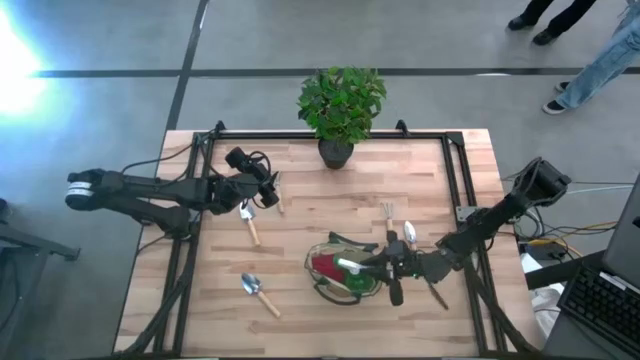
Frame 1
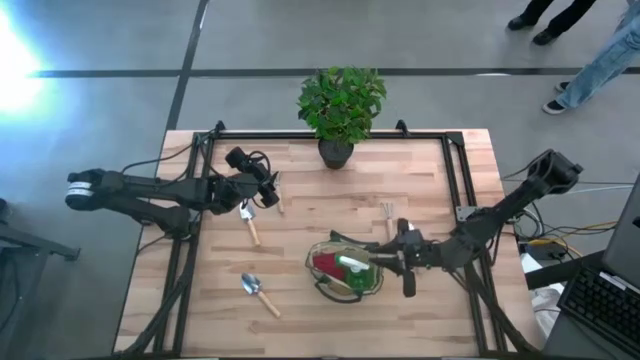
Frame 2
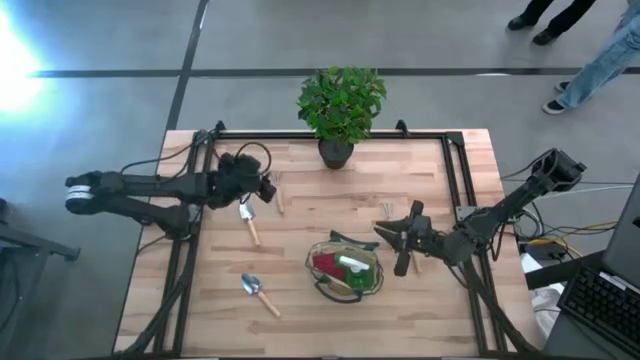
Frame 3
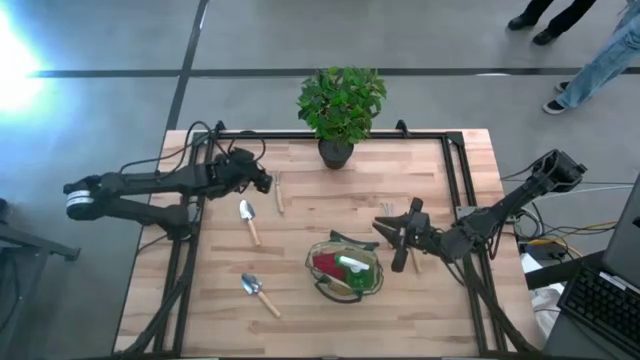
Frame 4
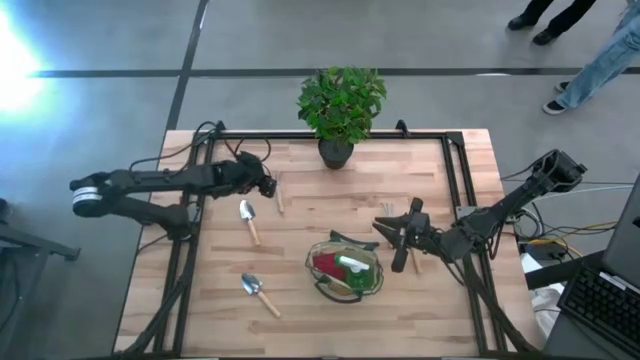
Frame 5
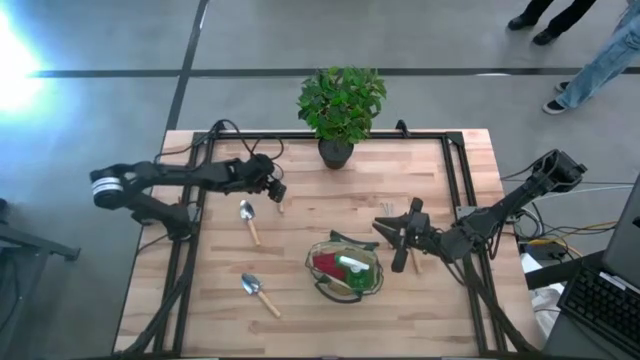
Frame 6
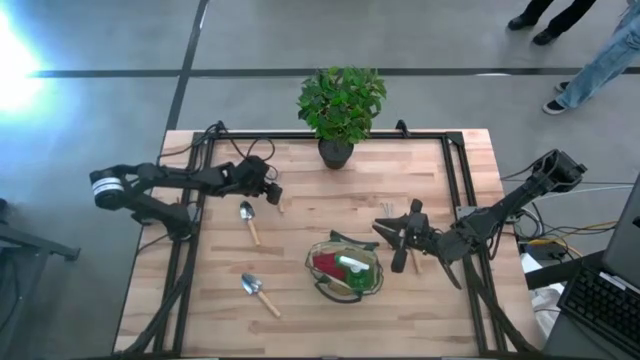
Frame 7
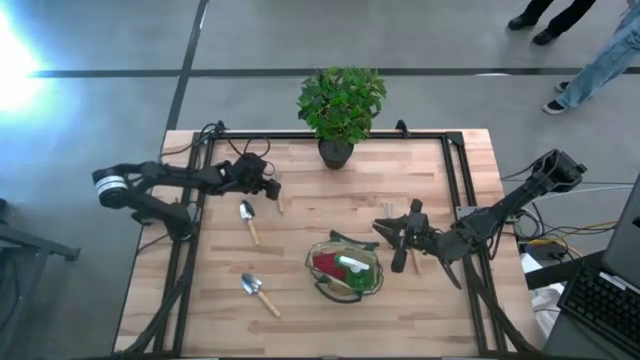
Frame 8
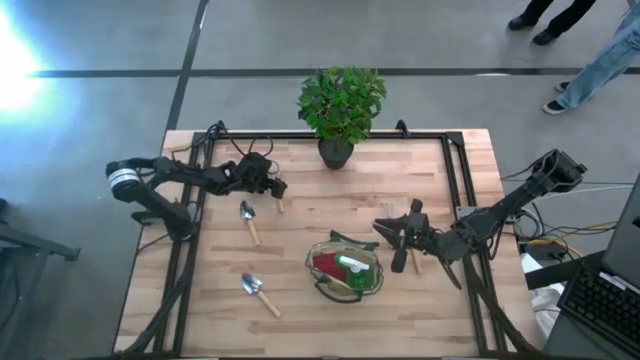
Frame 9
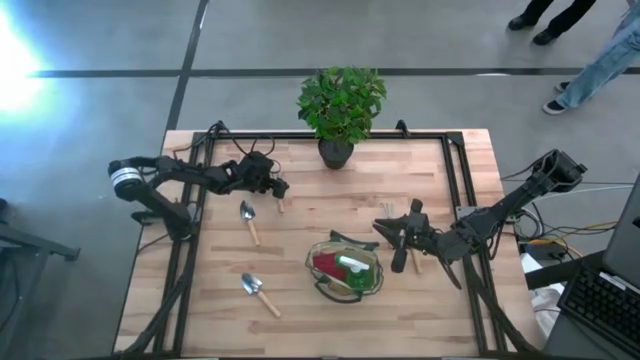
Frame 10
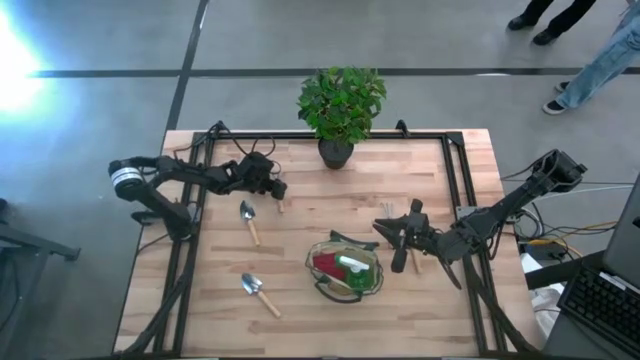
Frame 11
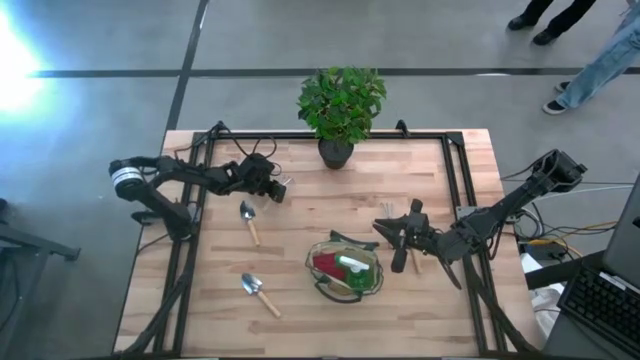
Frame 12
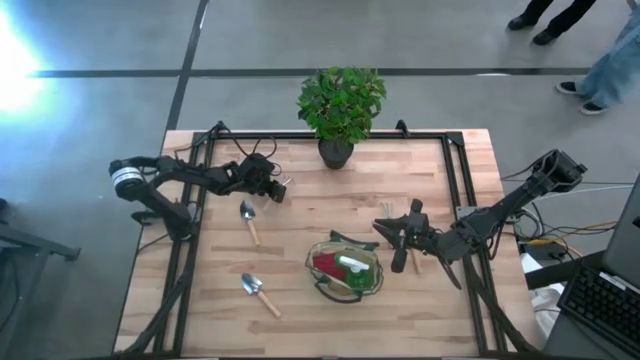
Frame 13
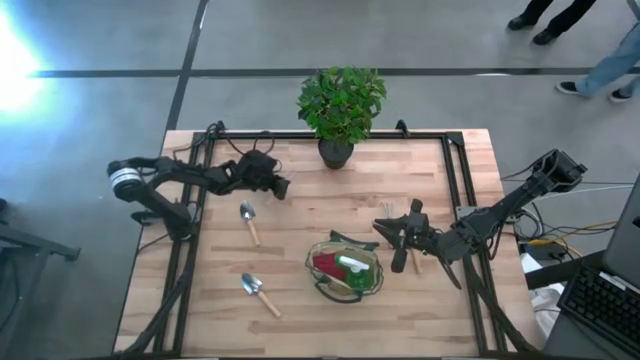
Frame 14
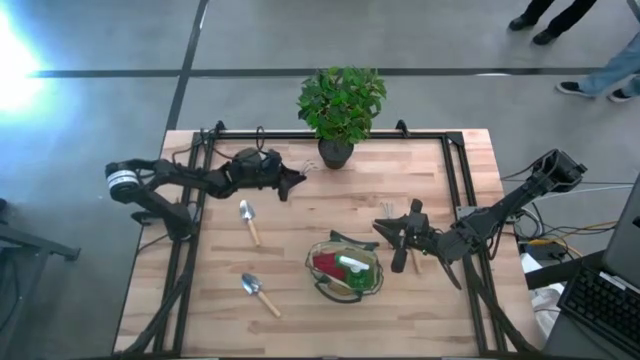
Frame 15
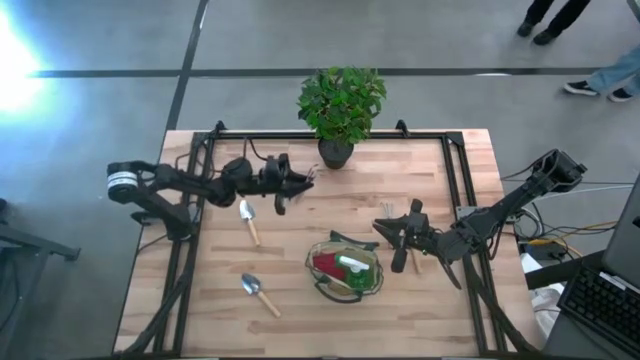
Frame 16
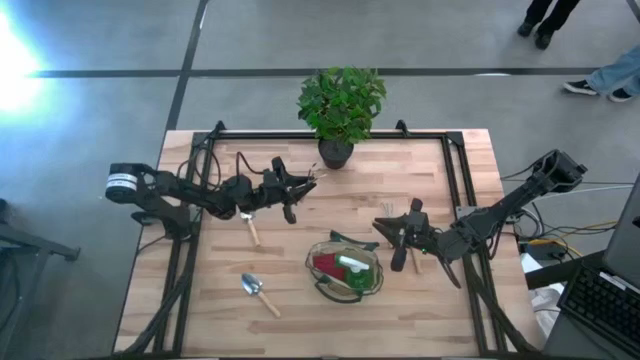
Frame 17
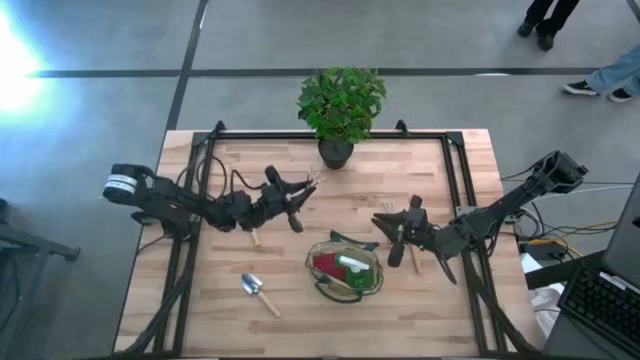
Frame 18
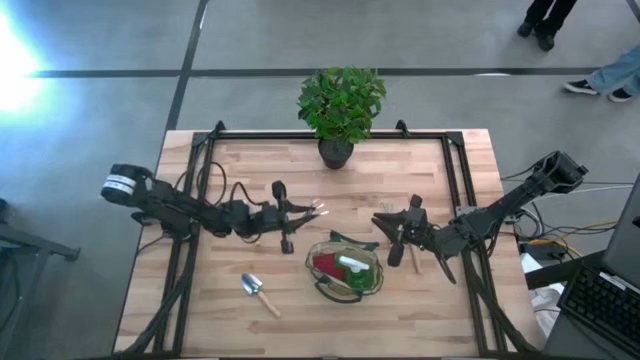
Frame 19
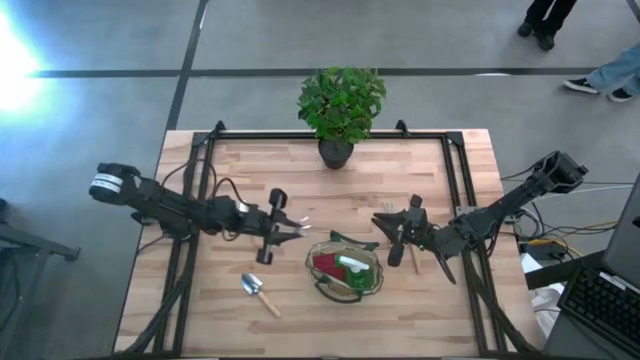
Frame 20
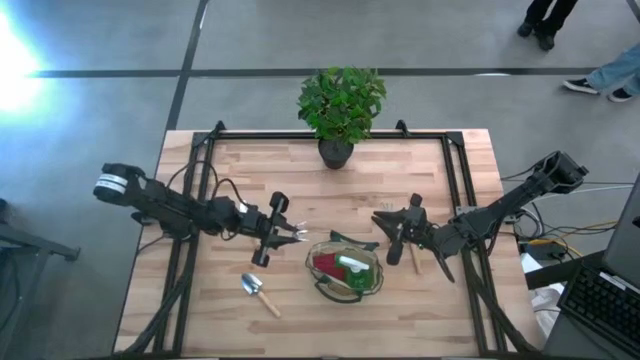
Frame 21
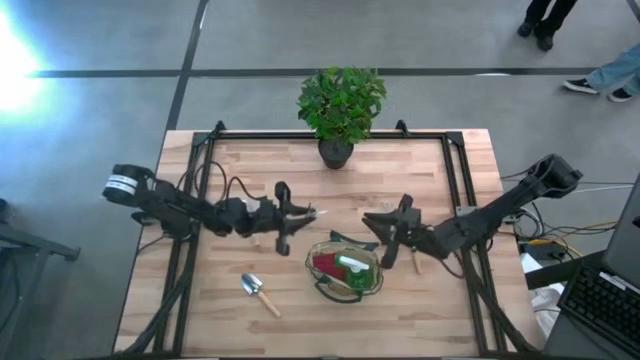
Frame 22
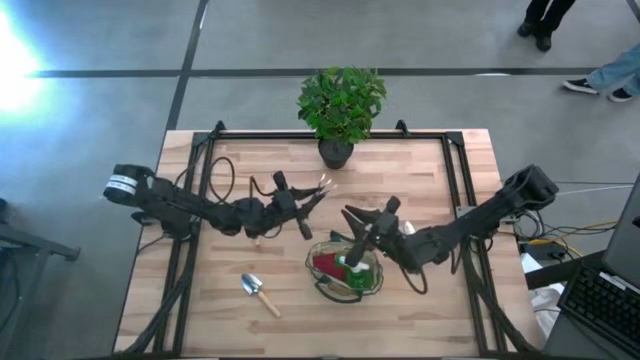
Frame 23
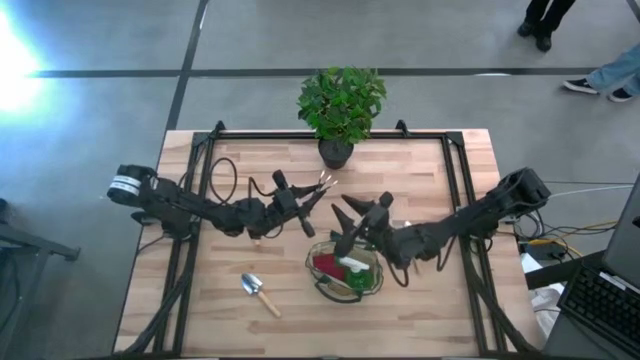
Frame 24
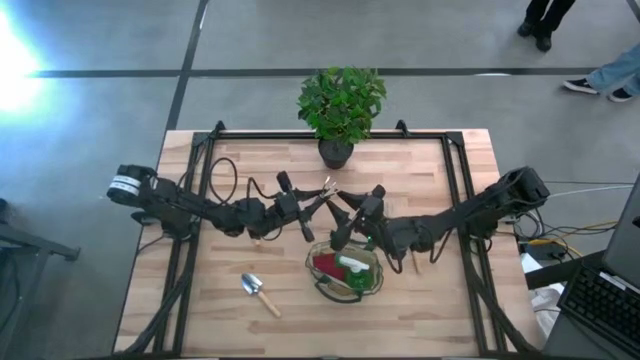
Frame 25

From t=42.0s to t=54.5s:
Task: Pick & Place Garden tools in Gardening bag
Put the left brown hand rake into the green gardening bag

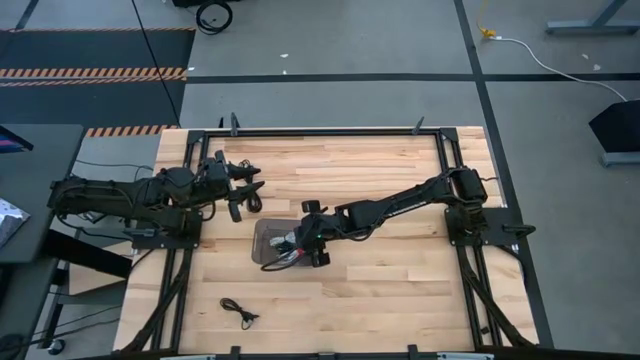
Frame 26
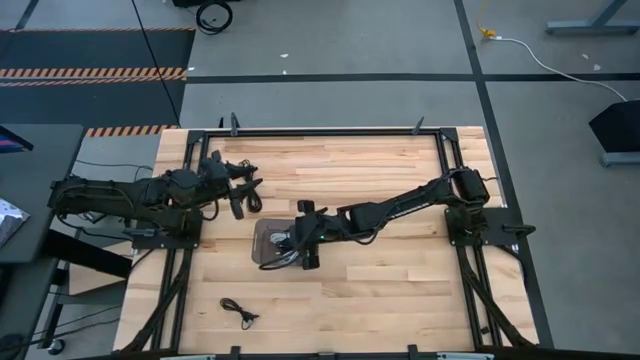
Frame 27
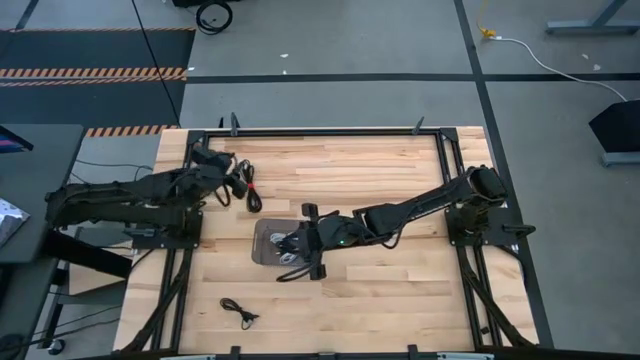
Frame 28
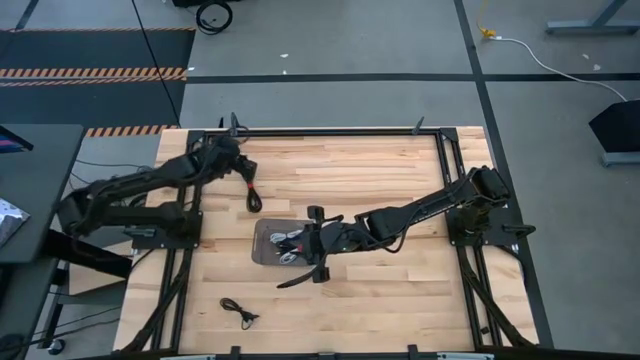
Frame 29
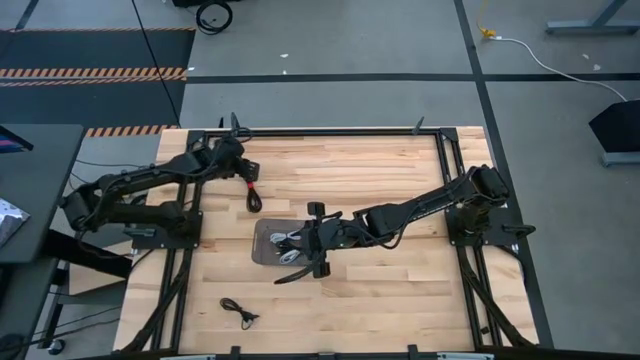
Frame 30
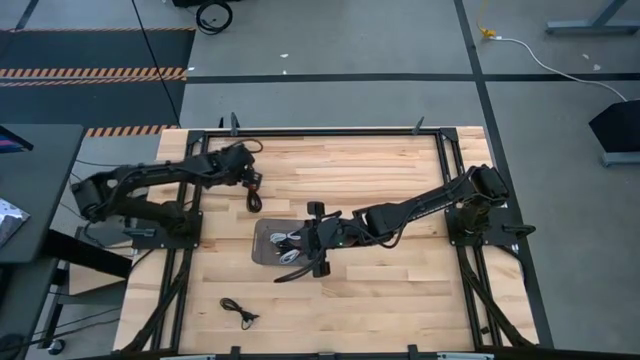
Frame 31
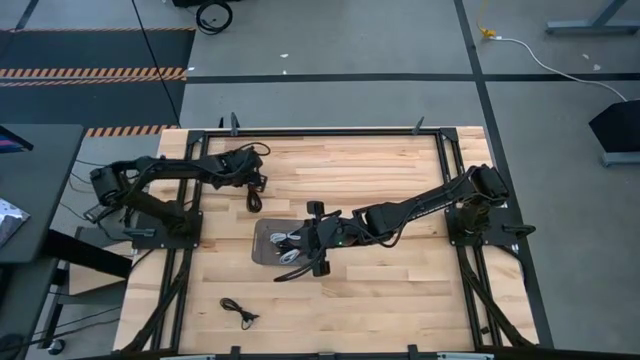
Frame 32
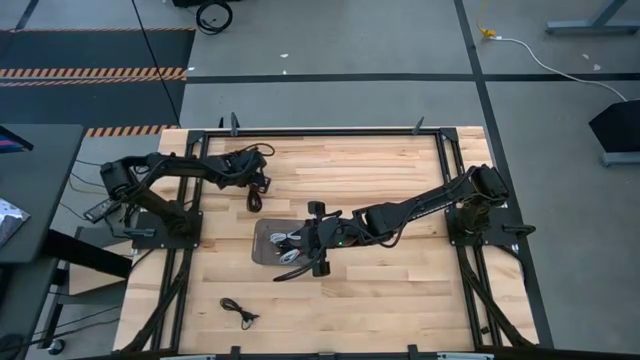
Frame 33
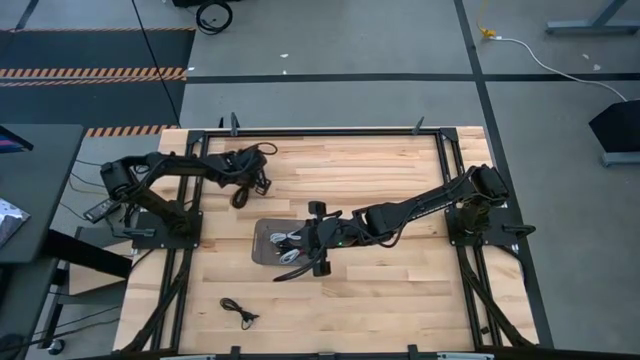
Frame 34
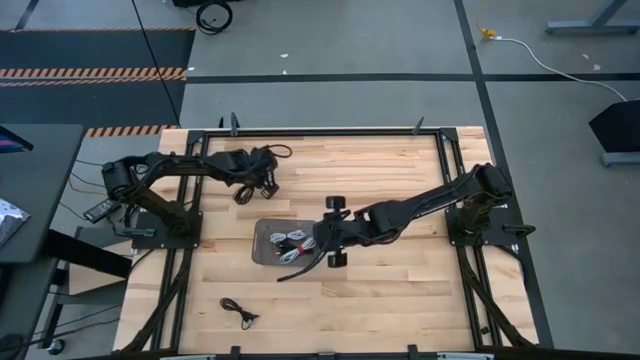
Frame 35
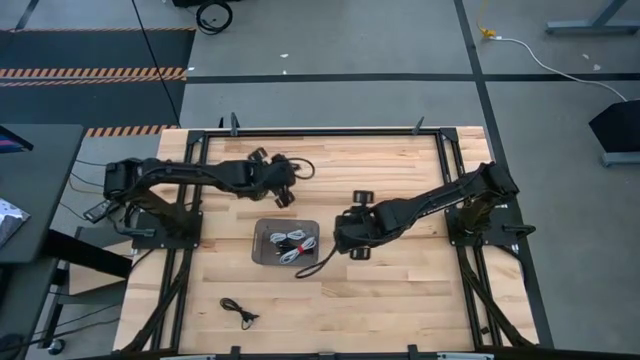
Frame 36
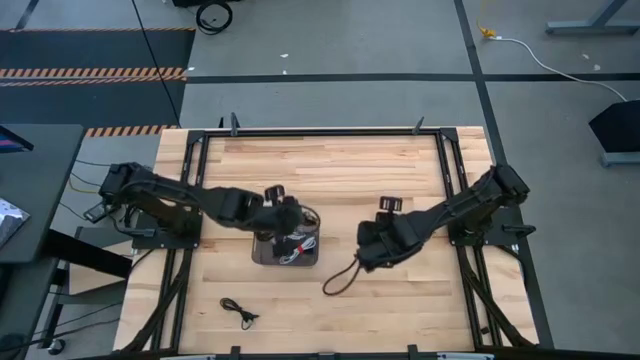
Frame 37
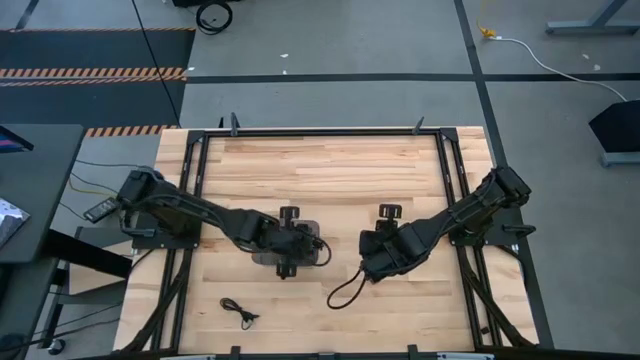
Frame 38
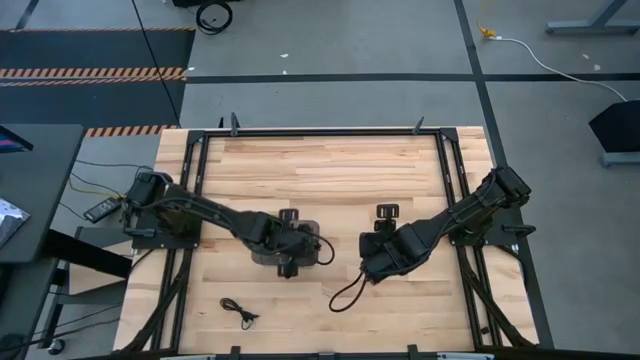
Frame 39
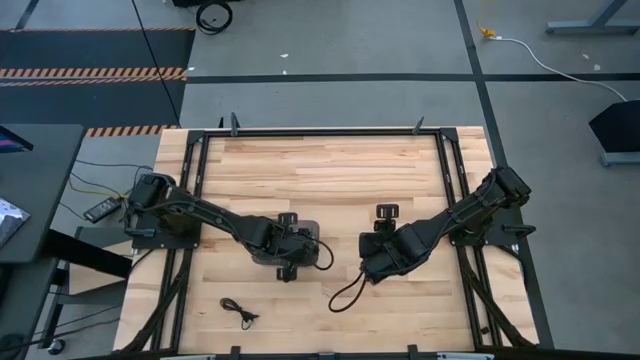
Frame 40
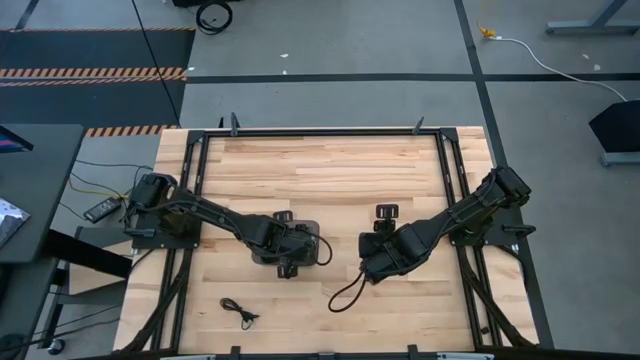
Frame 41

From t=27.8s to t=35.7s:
Task: Pick and place USB-C Cables
Put the top black USB cable into the black bin
